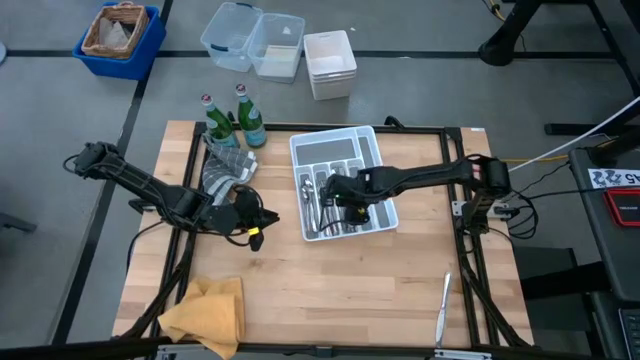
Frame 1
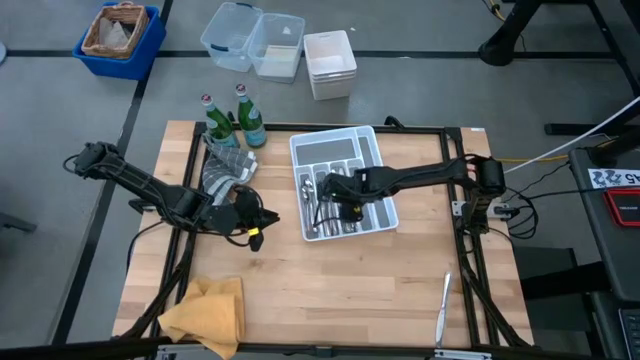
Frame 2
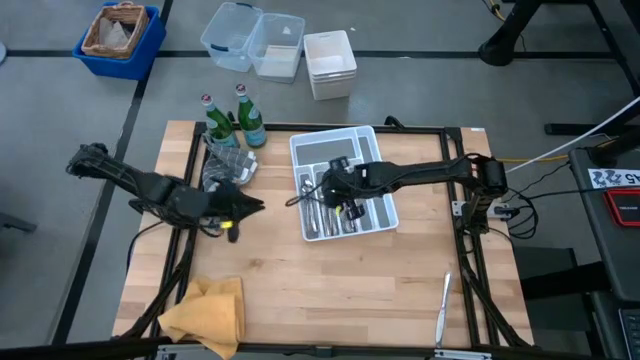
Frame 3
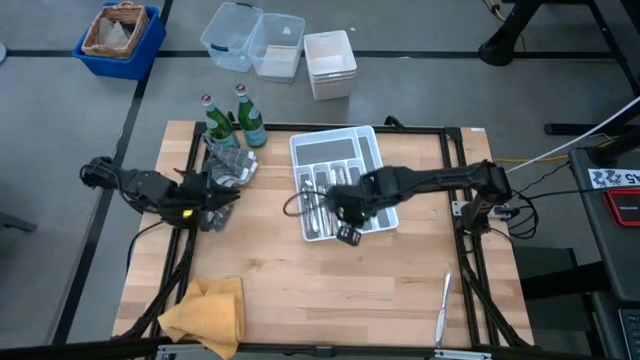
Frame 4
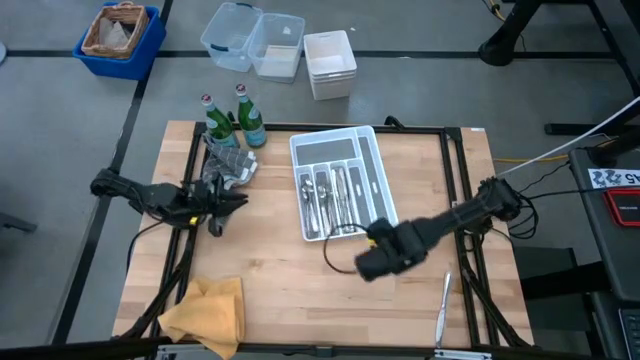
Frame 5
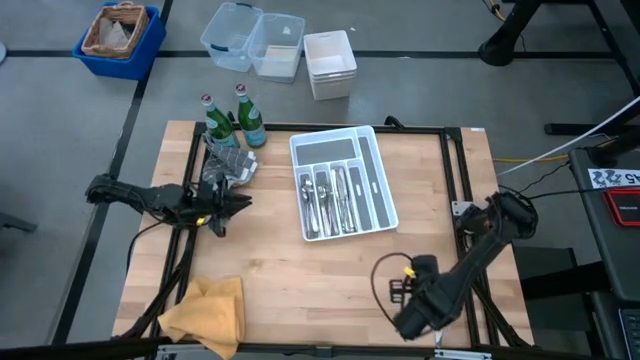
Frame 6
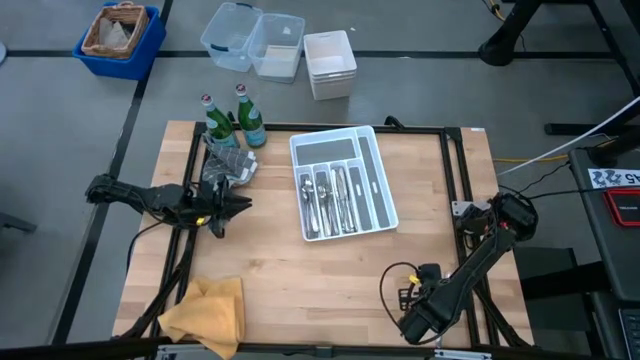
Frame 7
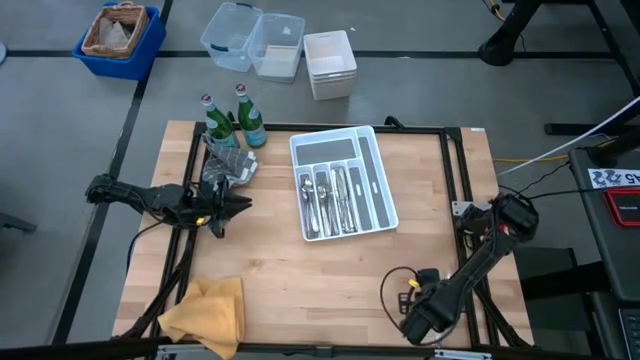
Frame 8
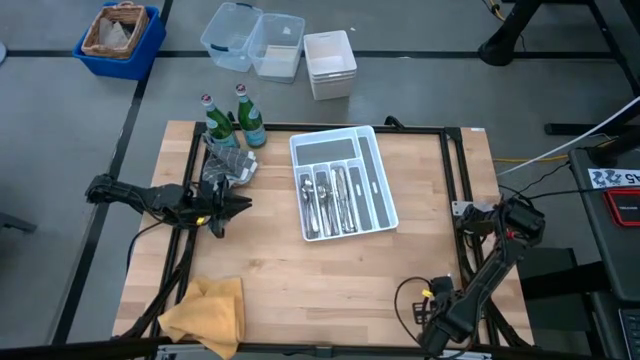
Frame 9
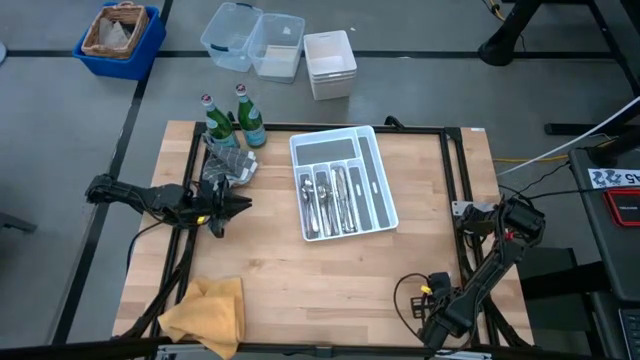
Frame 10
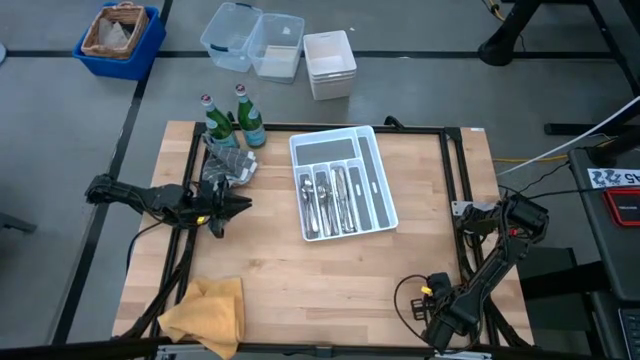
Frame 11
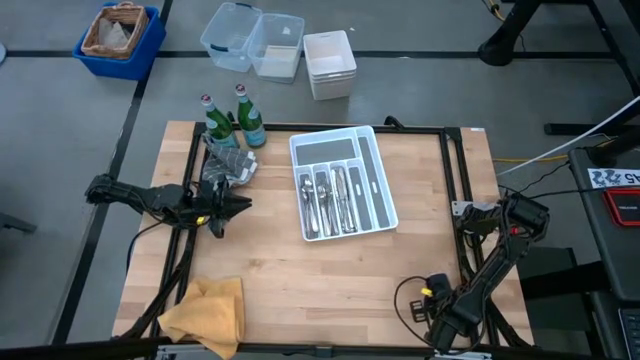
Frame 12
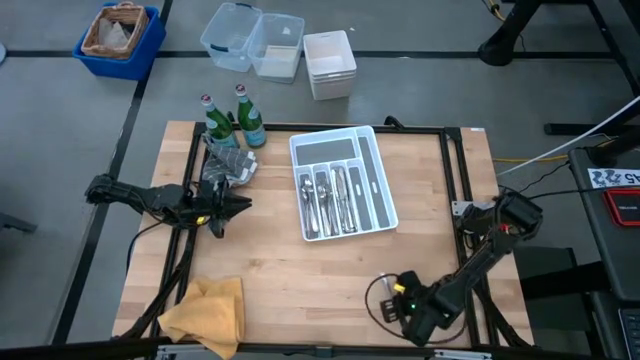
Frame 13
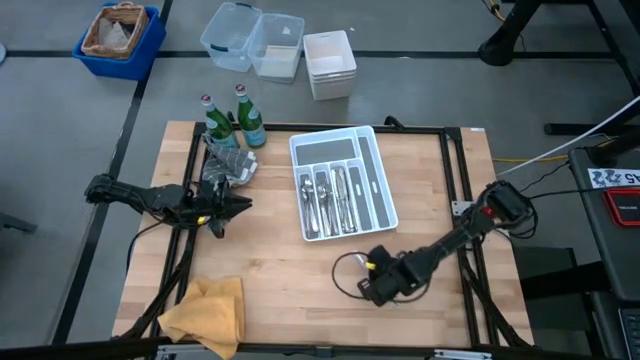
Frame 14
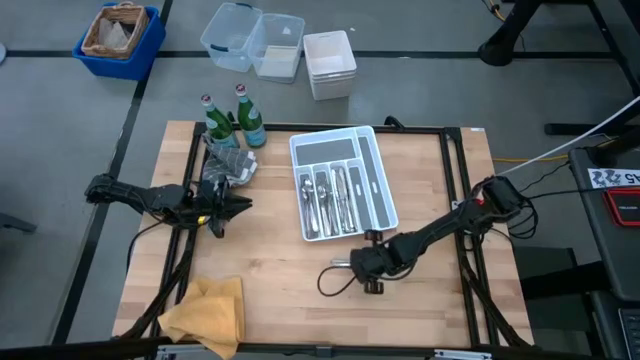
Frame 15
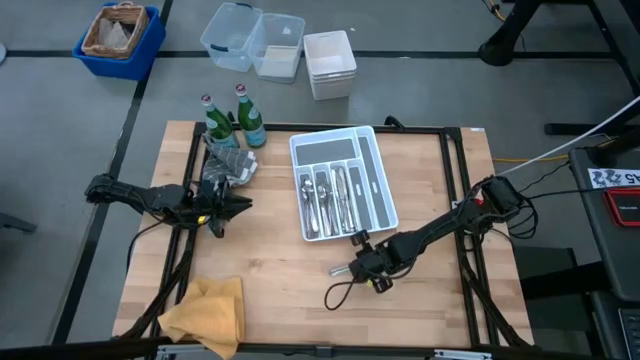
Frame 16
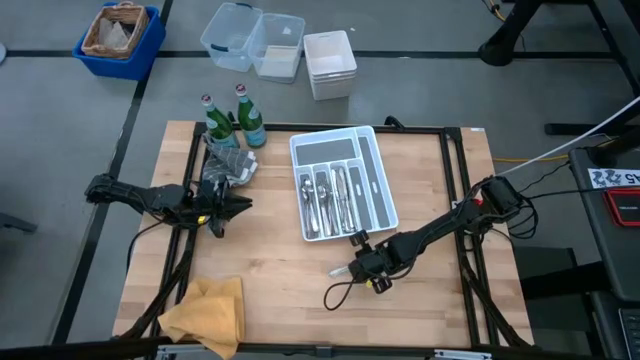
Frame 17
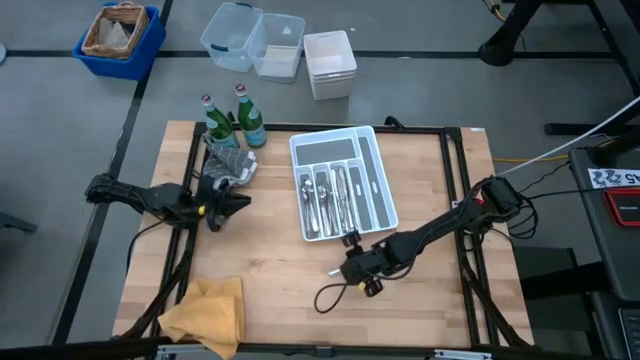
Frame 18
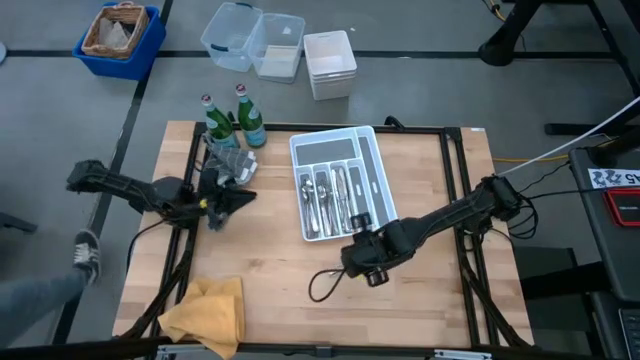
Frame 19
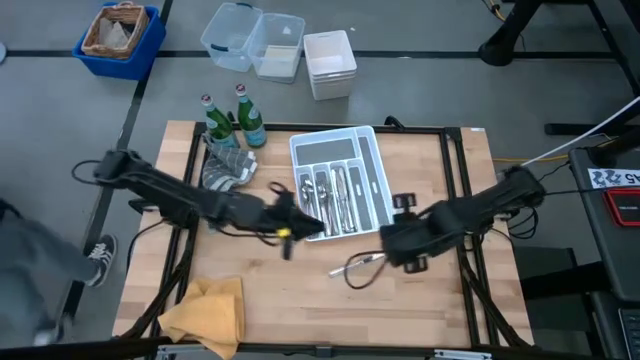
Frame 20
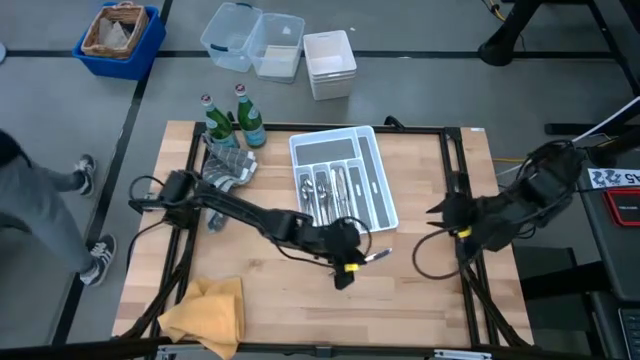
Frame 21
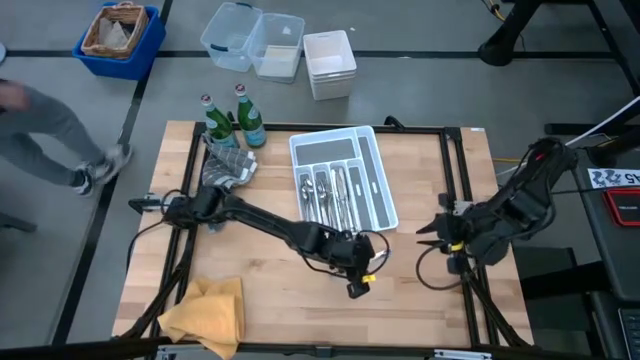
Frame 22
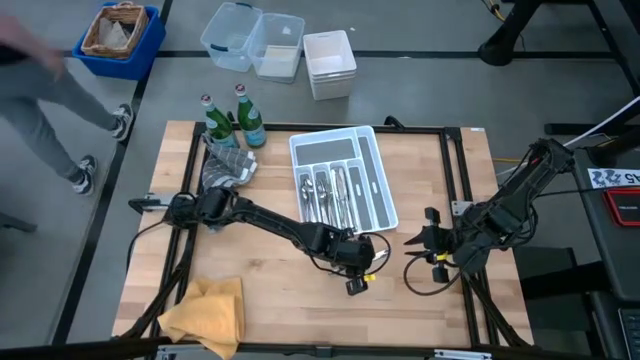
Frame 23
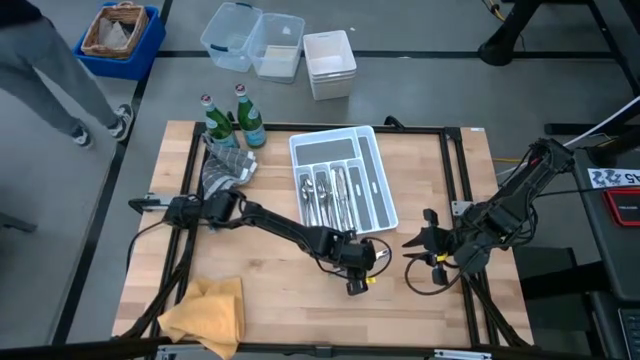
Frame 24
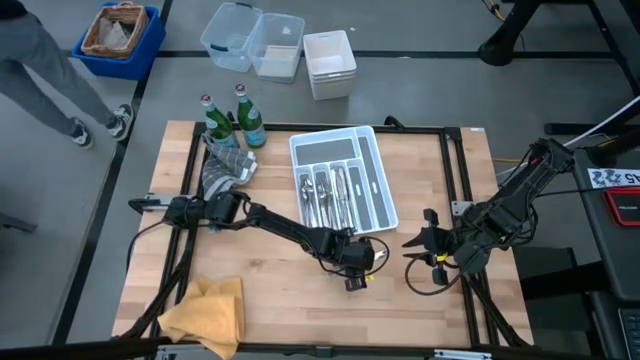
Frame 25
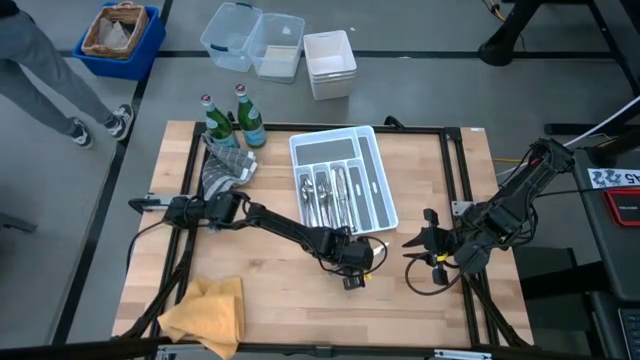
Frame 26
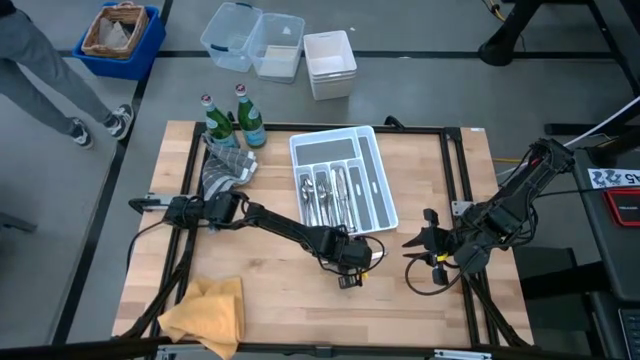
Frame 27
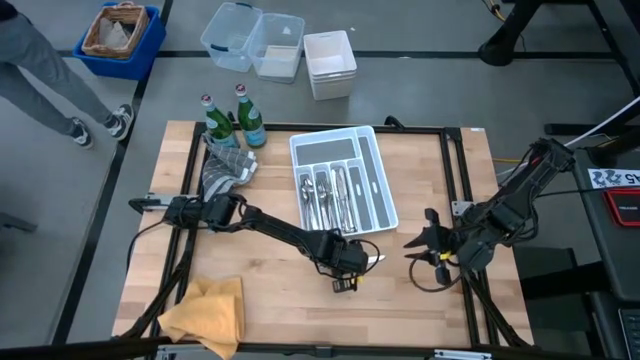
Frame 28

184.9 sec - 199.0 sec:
Task: Sort silverware
Put the silver table knife into the silverware tray

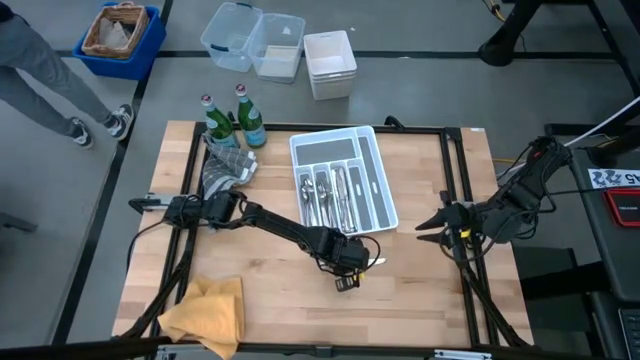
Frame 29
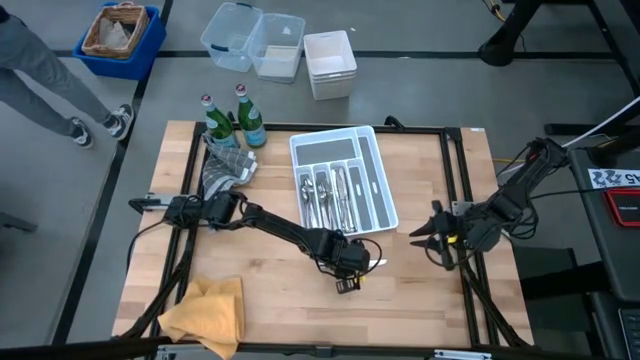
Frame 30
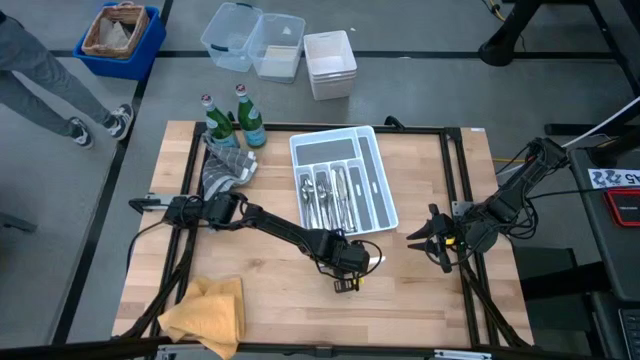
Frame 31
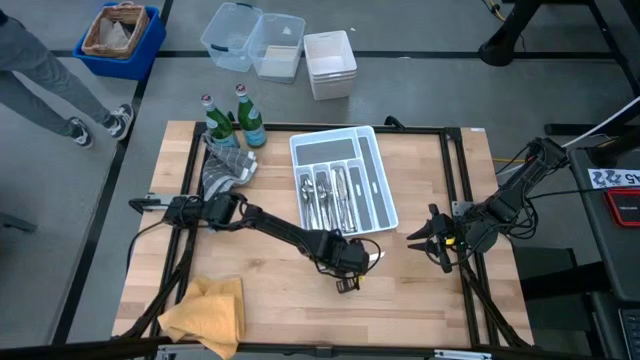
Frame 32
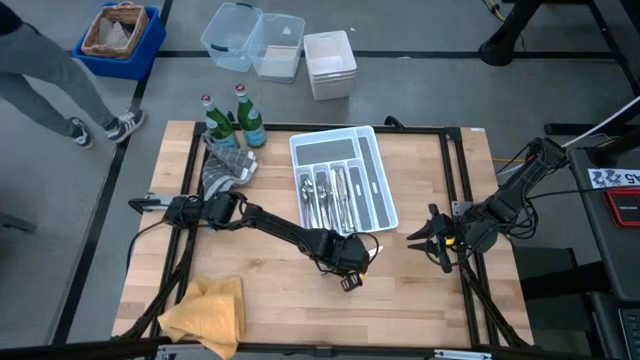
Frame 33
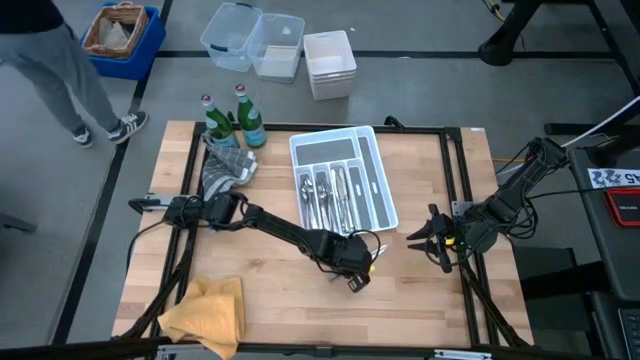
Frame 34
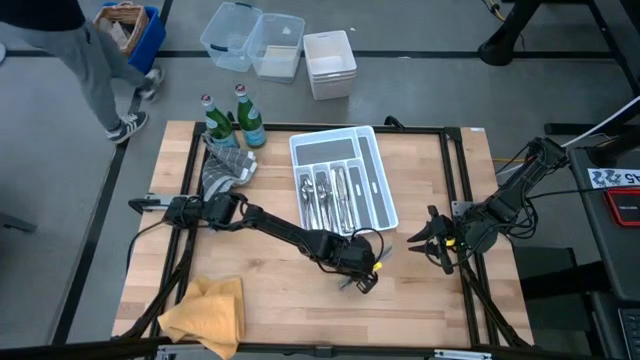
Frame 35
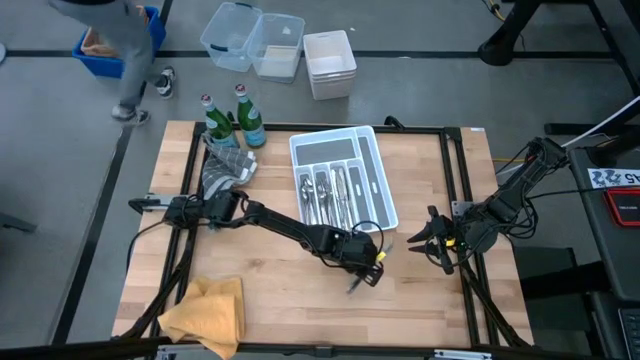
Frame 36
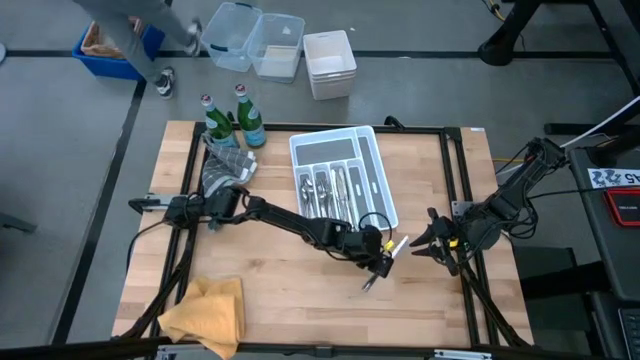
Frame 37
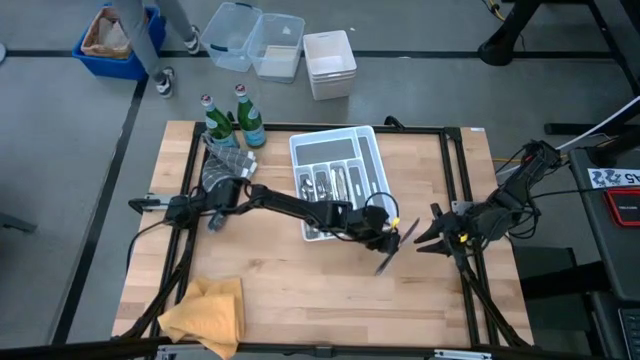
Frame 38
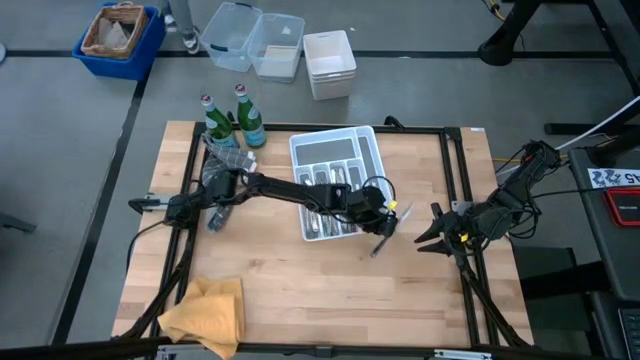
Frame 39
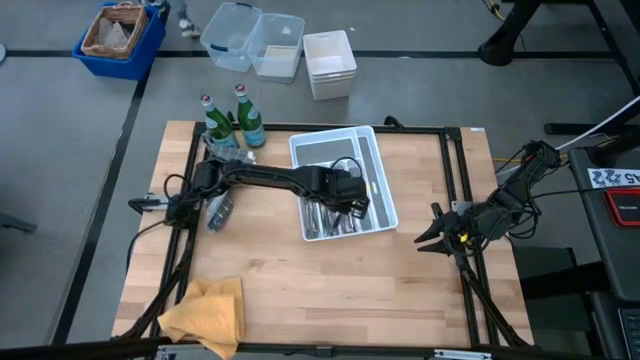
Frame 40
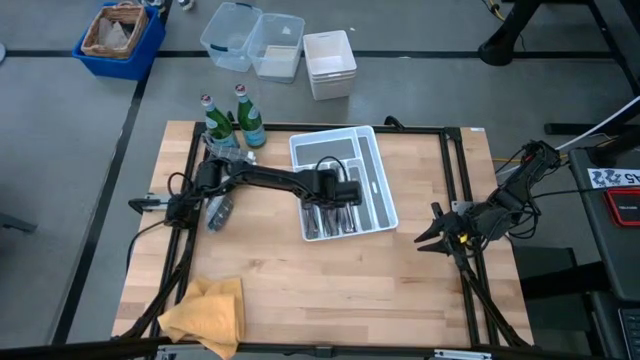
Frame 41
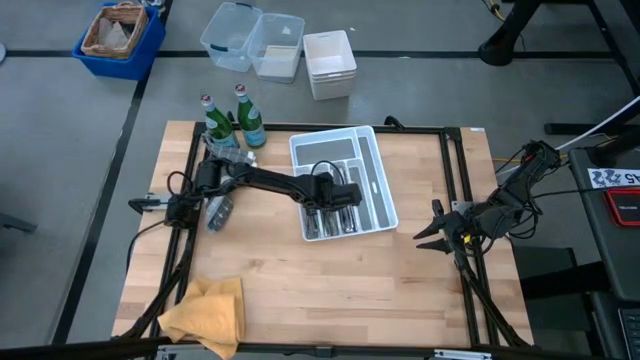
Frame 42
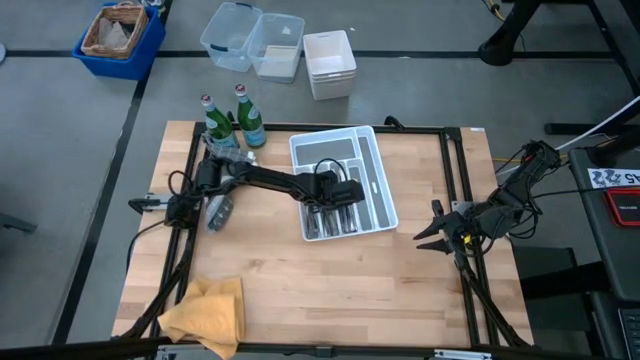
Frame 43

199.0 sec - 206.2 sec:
Put the silver table knife into the silverware tray
